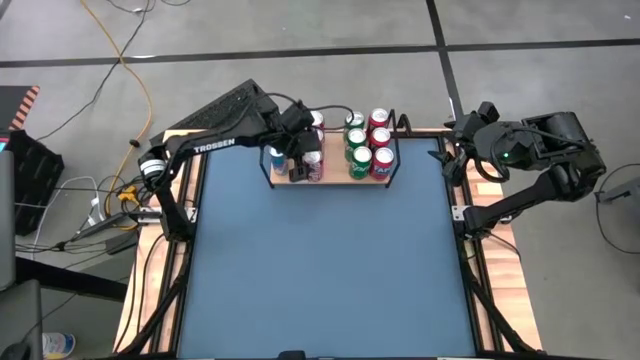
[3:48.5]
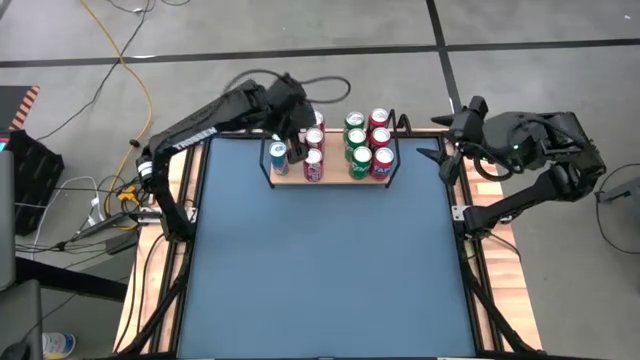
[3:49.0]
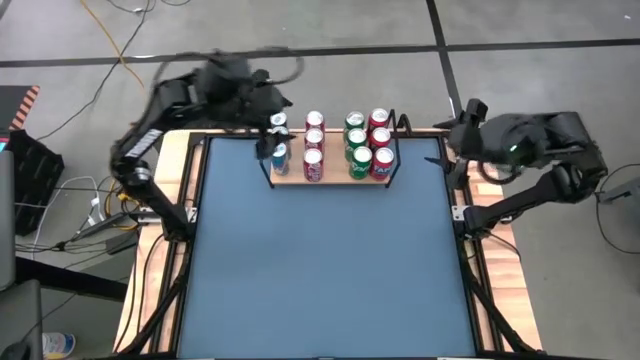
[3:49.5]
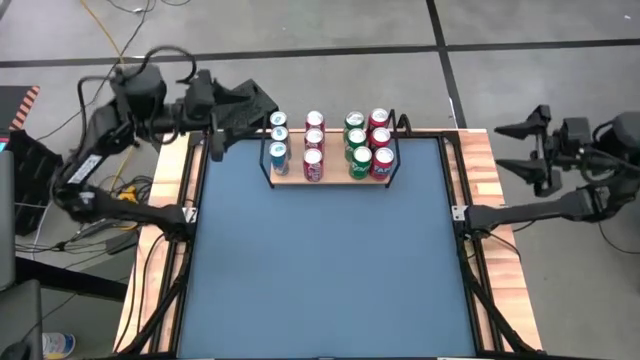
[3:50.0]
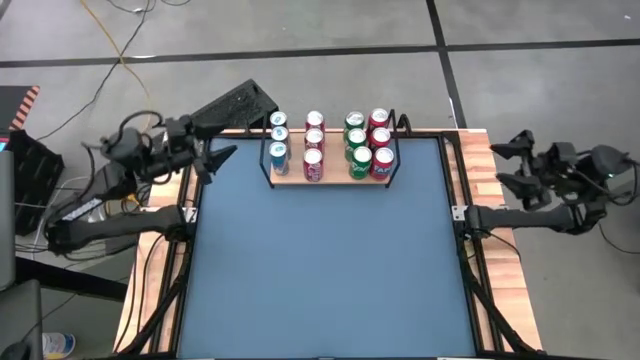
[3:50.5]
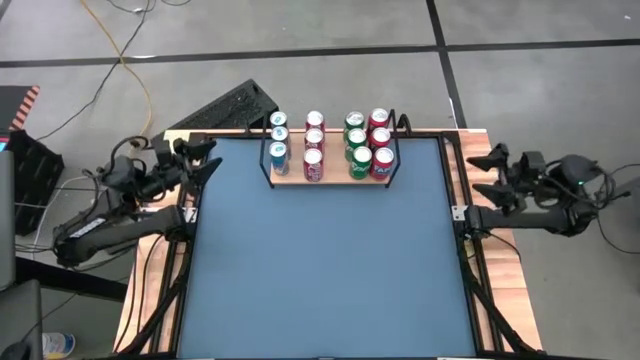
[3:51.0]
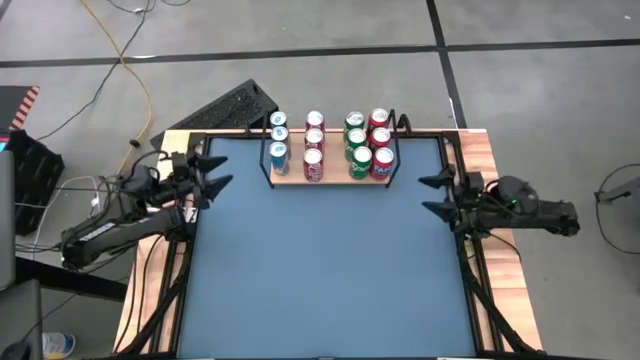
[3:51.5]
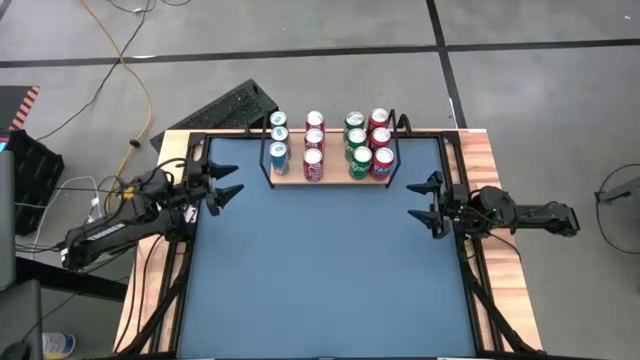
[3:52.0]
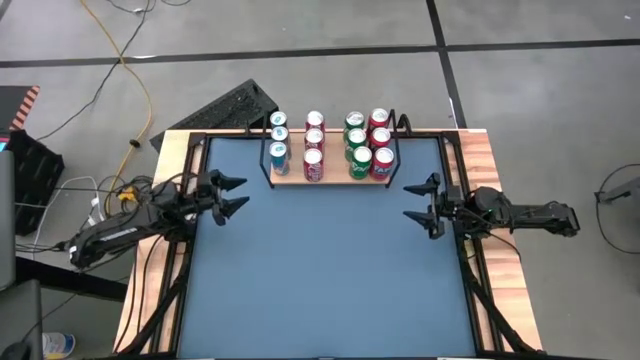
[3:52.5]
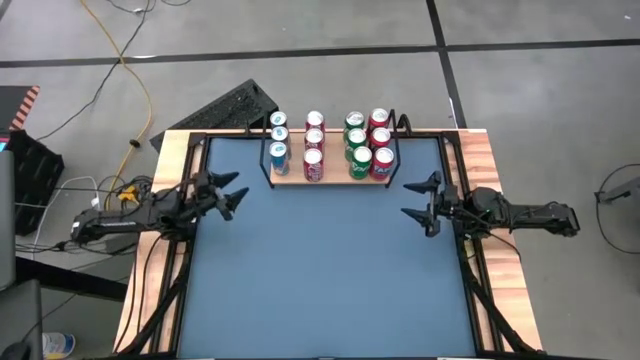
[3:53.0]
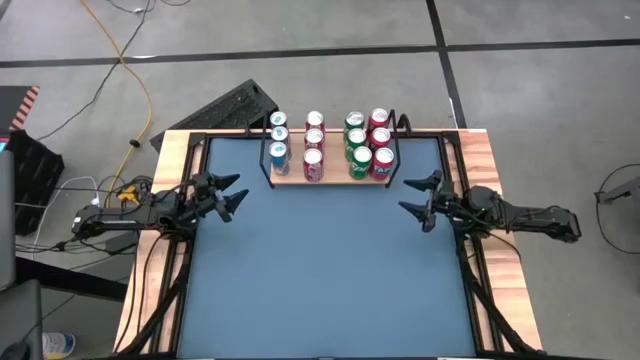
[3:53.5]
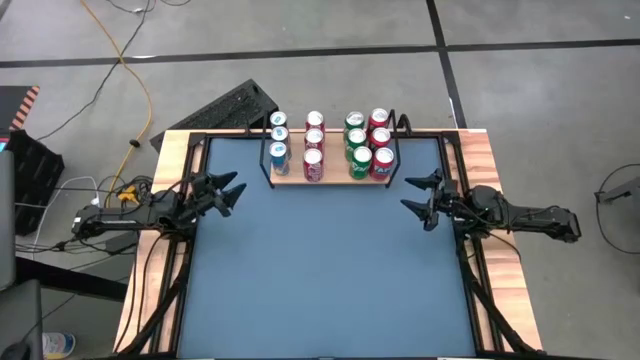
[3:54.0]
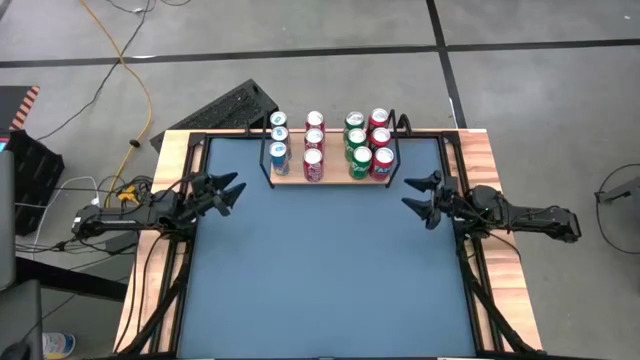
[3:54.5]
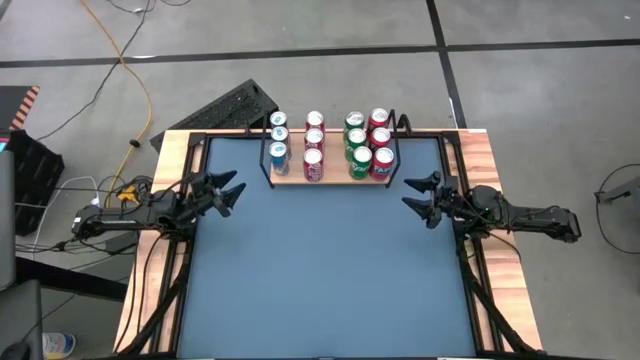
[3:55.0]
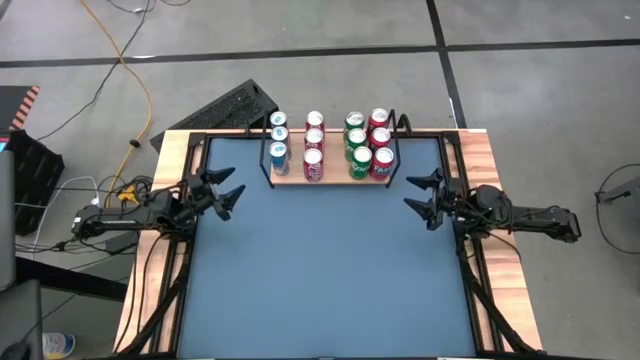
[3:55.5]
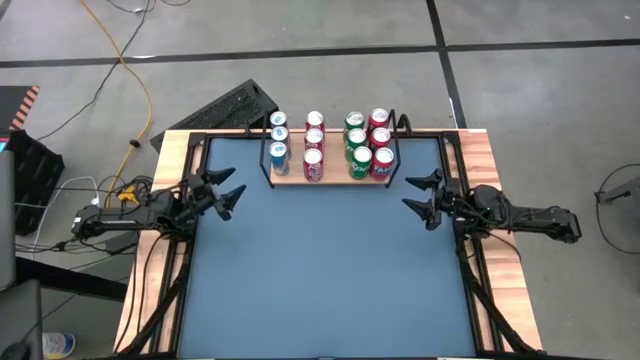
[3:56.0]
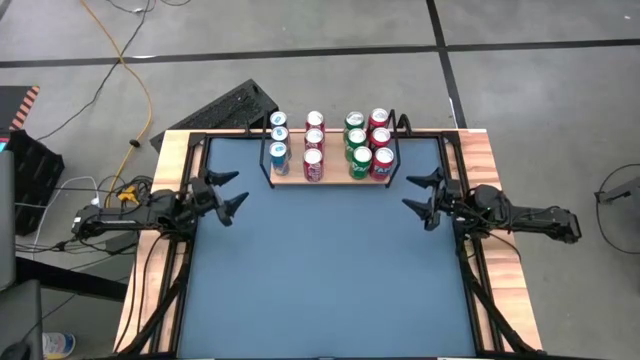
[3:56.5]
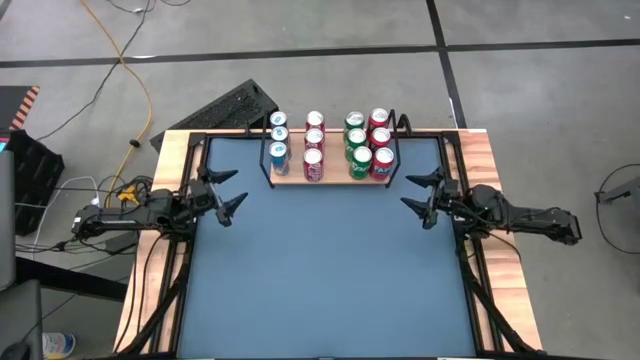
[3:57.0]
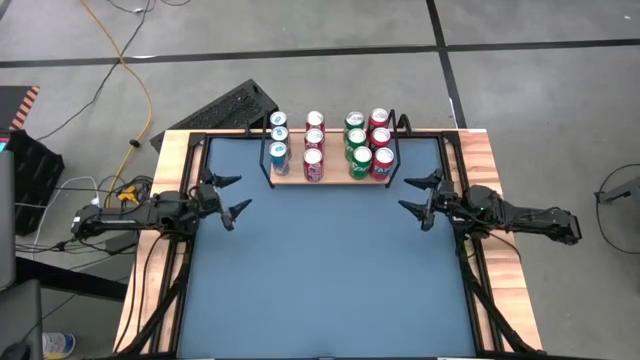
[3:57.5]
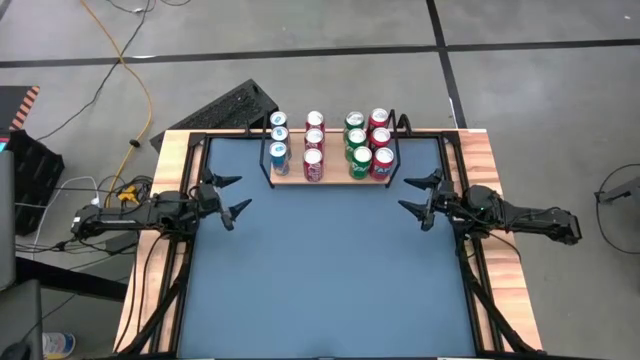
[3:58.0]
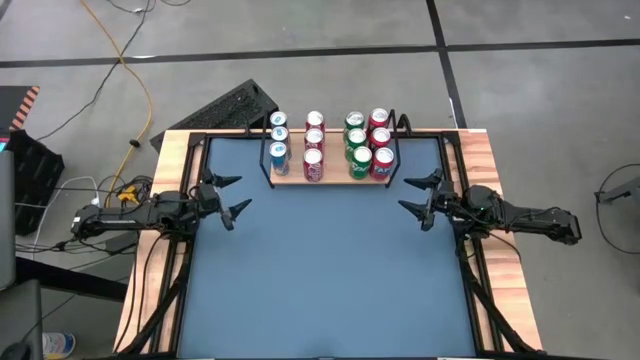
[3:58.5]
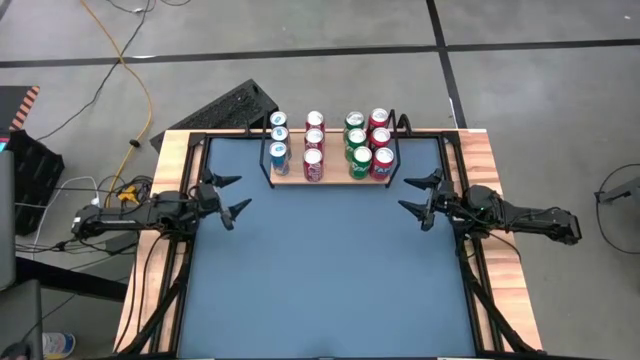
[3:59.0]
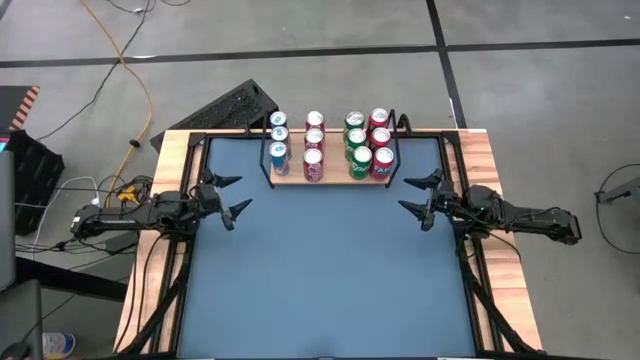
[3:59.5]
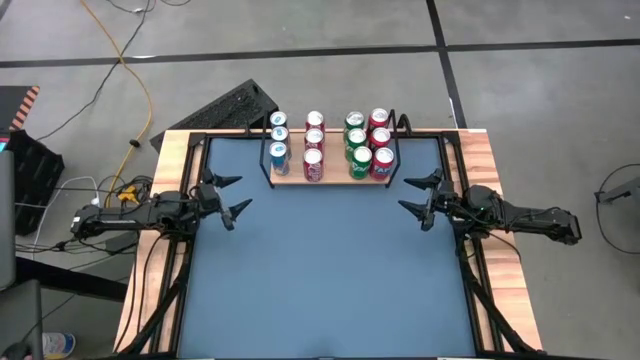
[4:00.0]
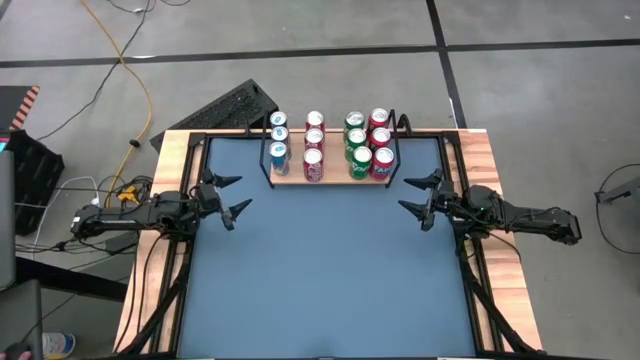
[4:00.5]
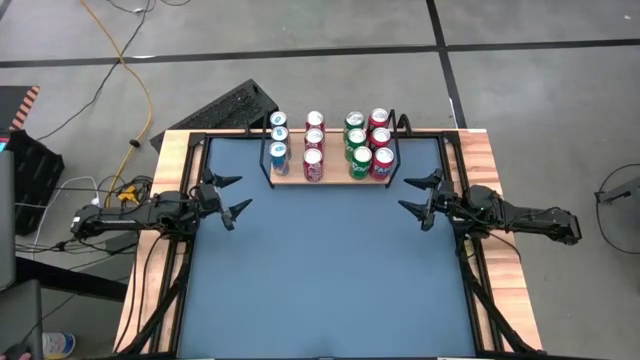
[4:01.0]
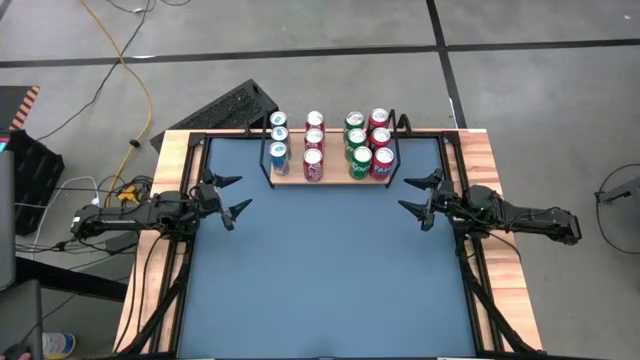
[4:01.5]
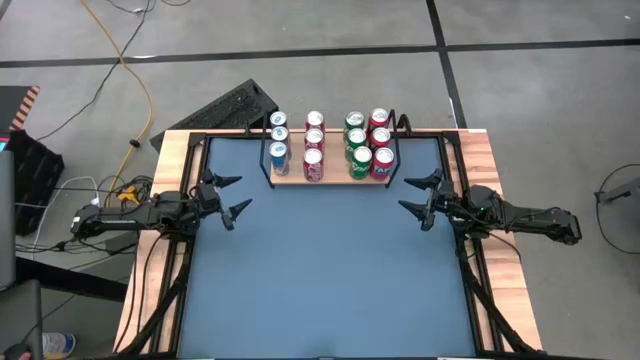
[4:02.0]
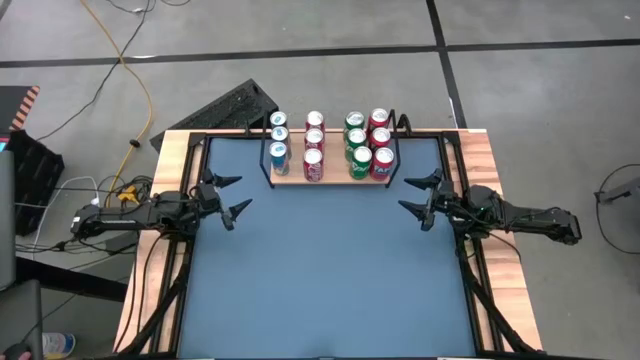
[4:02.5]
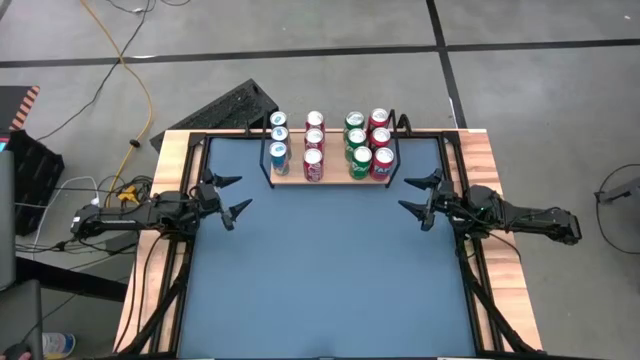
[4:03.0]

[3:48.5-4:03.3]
Task: Place canned beverage on shelf
Return to Home Position
